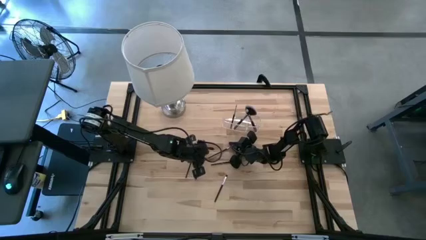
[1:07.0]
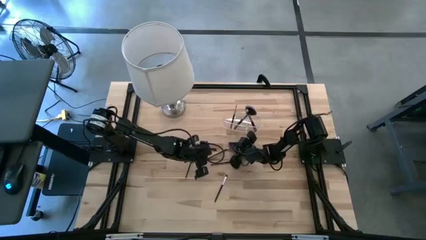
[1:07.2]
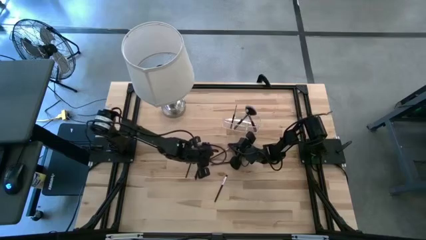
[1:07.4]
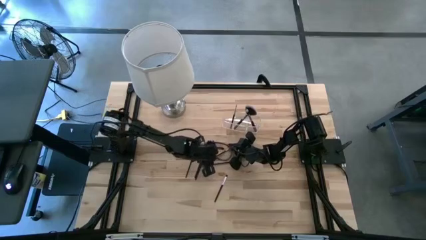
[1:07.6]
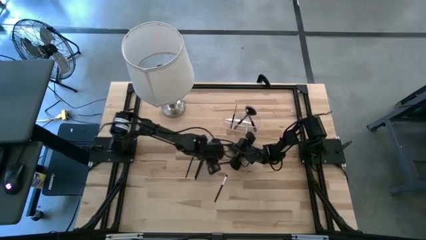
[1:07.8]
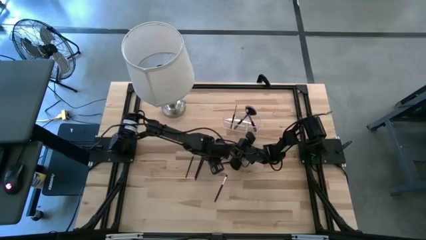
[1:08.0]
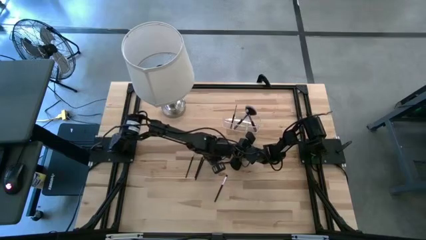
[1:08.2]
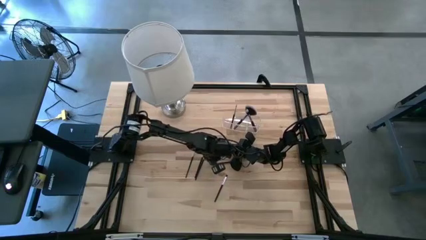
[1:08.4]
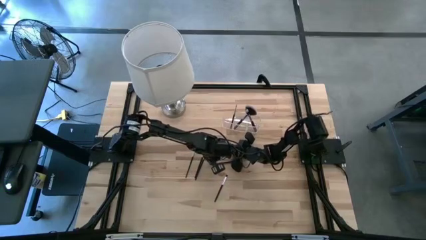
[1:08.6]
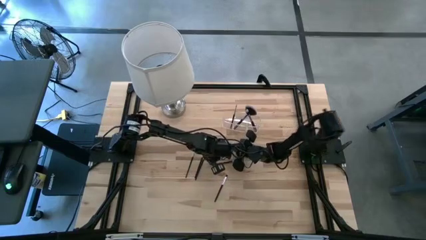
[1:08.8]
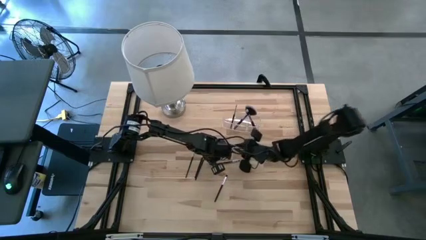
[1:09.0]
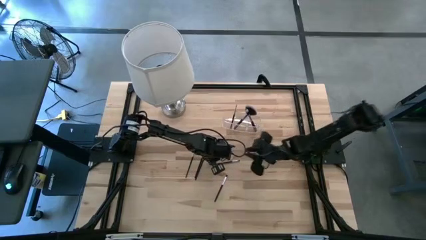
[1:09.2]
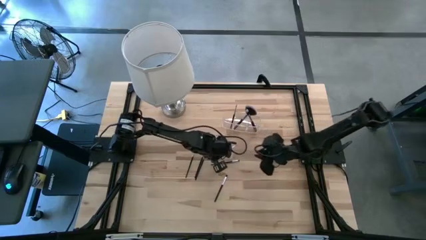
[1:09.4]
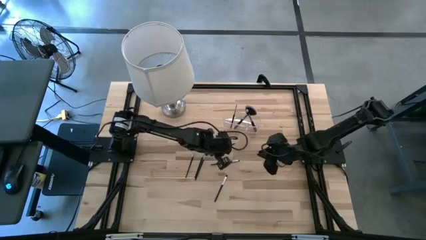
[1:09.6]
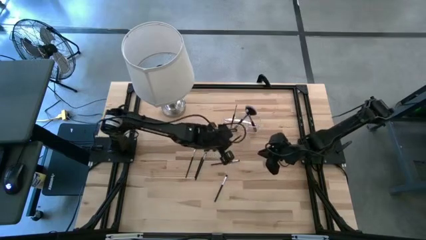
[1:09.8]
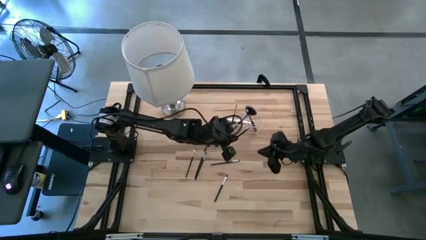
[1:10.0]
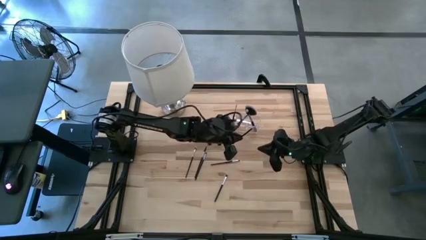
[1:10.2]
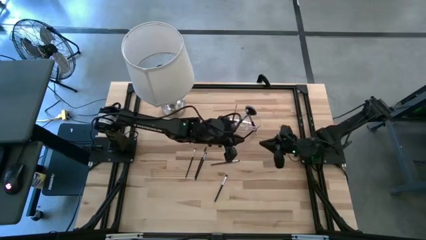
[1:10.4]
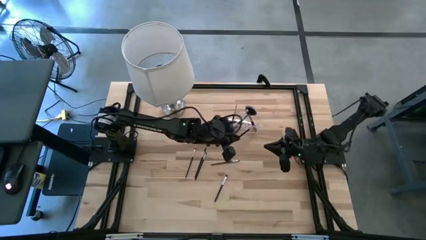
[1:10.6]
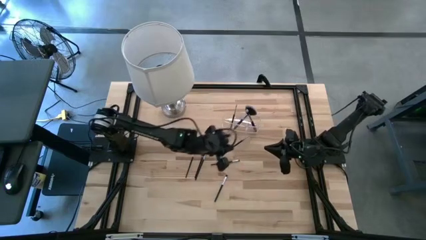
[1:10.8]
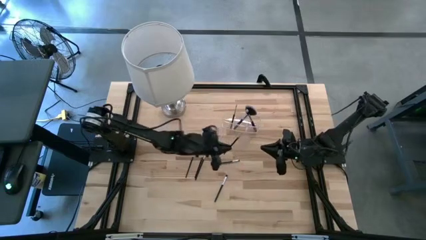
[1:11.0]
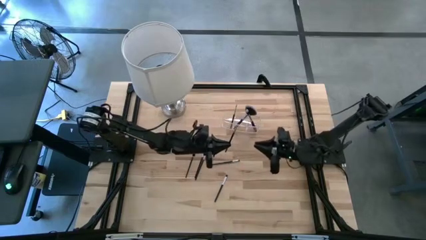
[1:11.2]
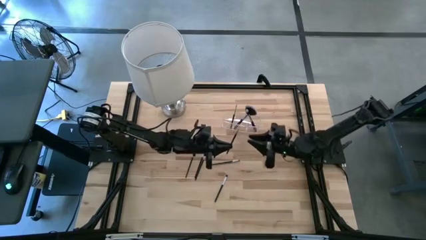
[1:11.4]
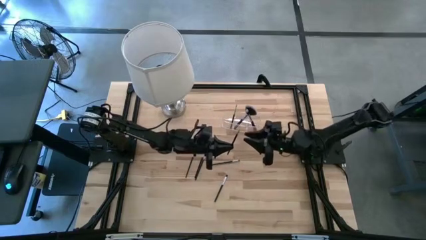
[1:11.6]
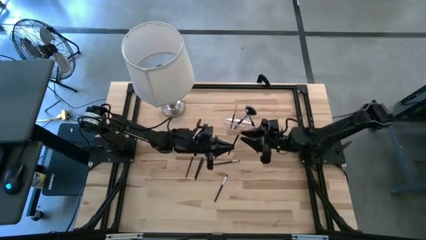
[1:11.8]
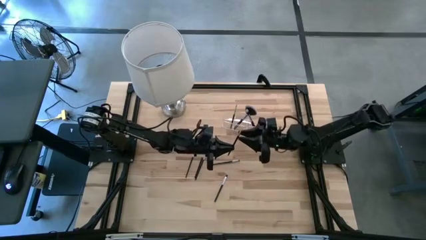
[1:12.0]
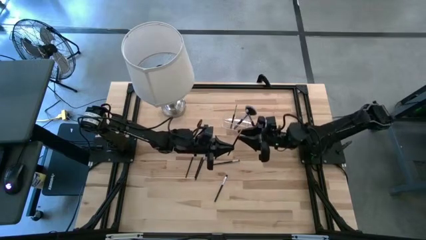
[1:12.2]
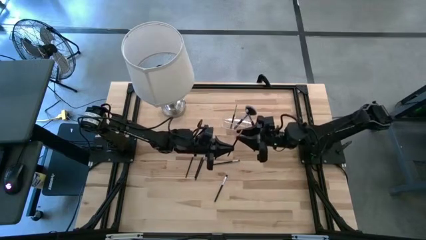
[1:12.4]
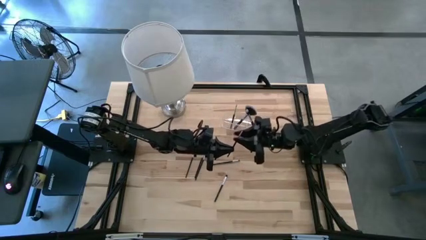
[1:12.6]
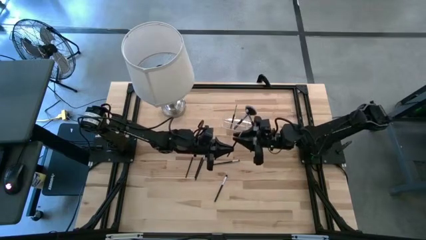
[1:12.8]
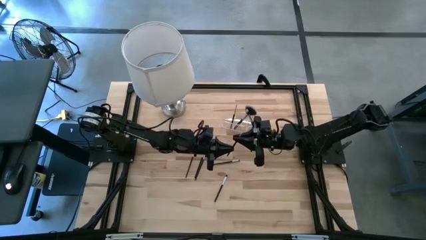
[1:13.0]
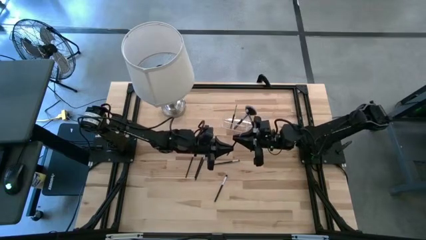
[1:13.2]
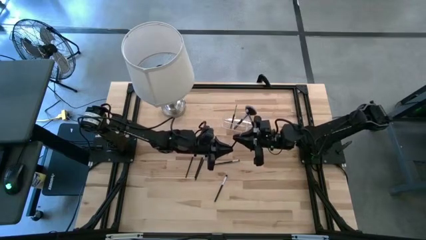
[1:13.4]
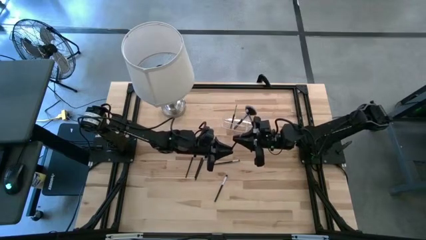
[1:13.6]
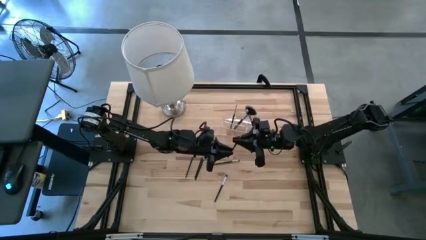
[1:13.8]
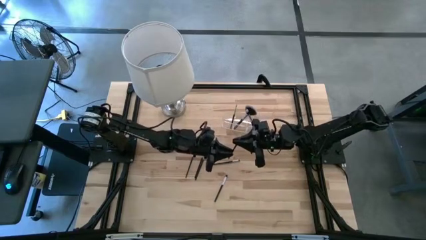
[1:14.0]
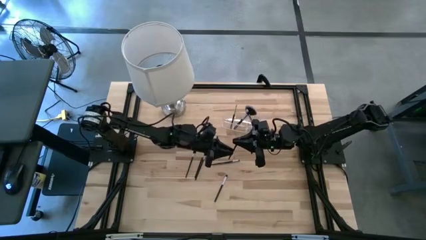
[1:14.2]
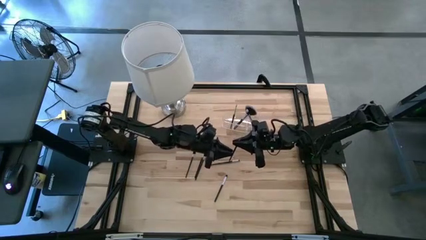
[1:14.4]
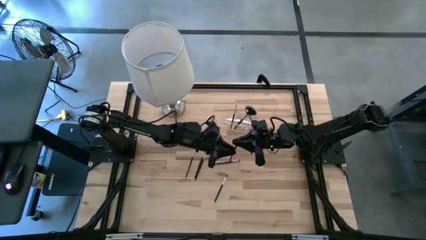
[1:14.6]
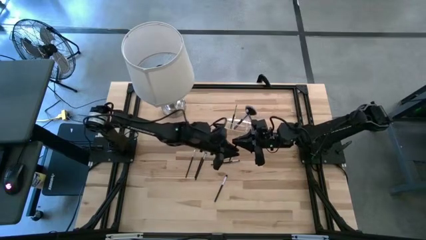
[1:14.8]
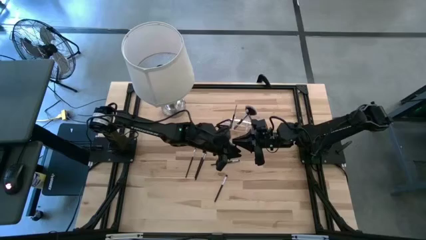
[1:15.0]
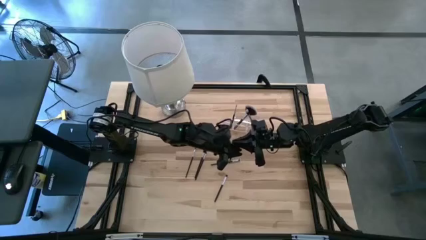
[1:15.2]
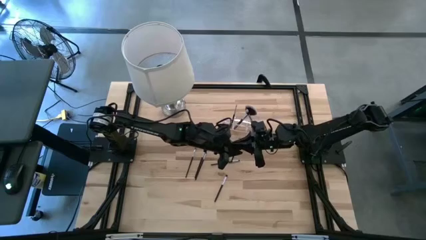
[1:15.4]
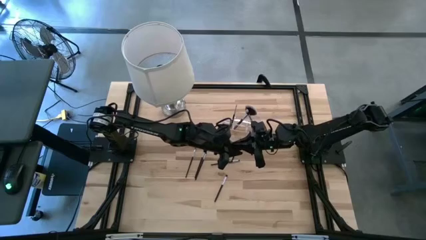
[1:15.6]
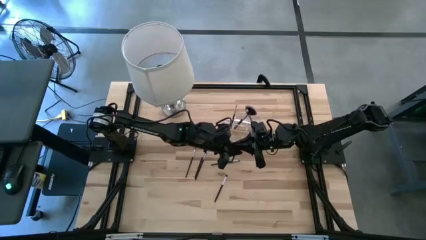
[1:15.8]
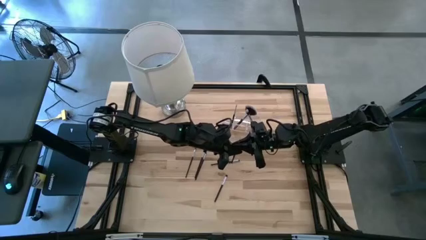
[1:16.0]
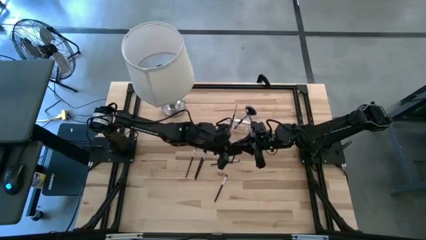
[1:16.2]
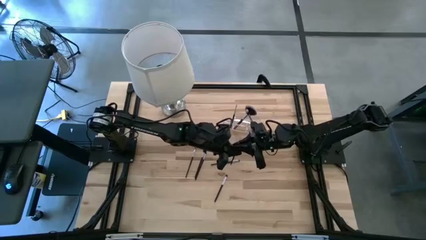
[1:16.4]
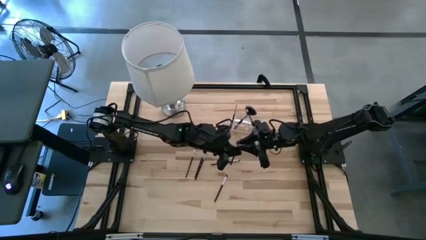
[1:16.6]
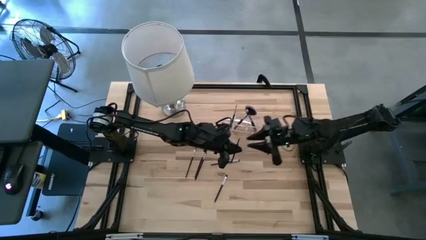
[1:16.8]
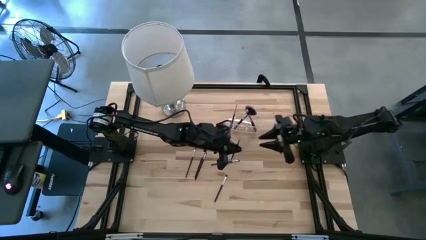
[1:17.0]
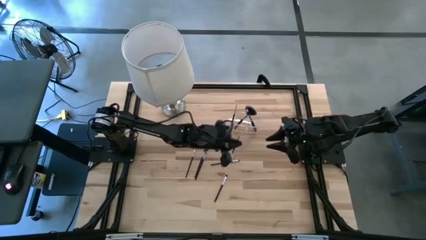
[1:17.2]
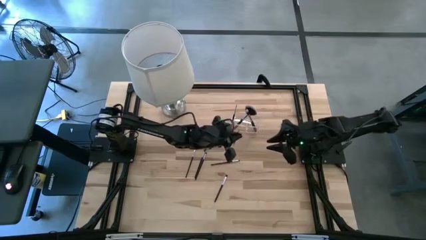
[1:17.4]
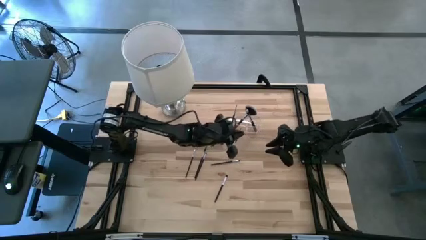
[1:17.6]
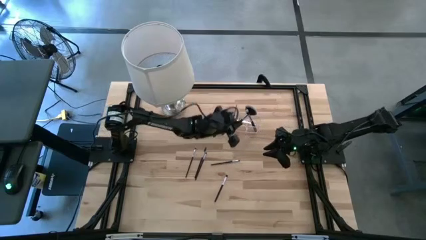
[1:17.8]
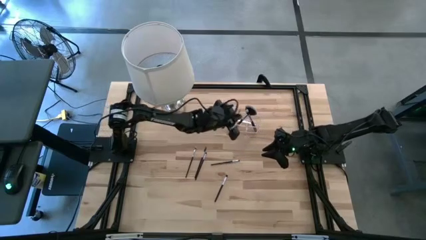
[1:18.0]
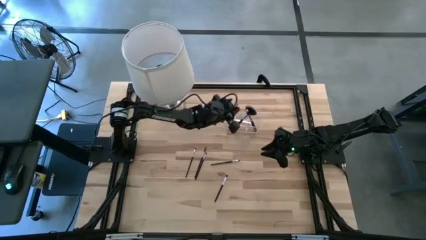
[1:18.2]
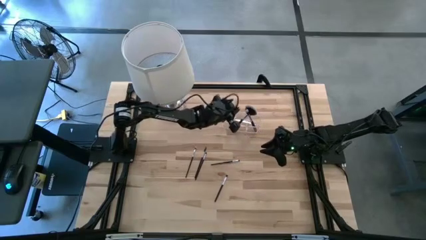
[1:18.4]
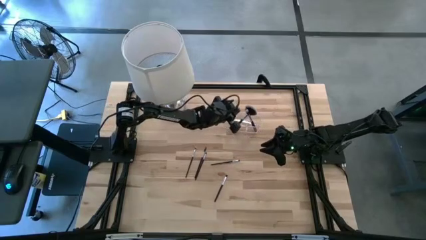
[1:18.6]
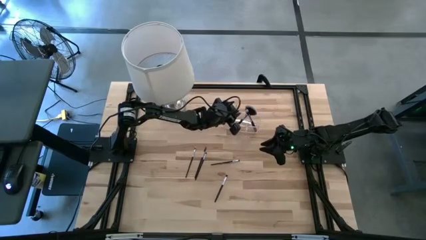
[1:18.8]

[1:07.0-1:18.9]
Task: Pick & Place Makeup Supplies
Put the makeup brush into the transparent organizer
